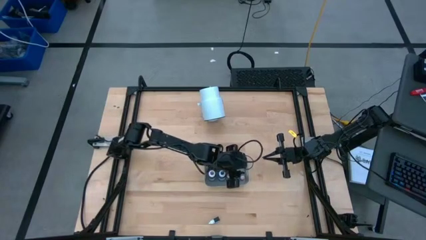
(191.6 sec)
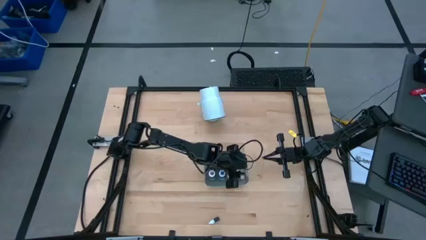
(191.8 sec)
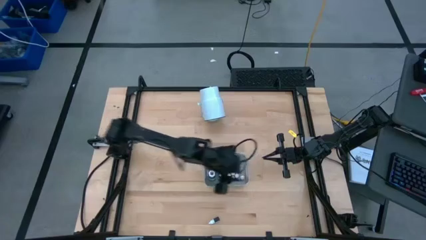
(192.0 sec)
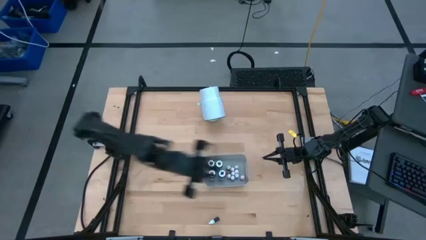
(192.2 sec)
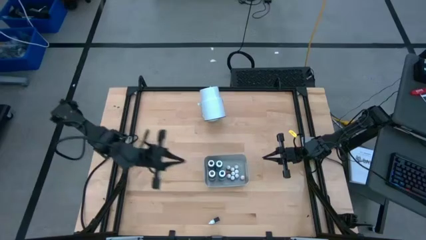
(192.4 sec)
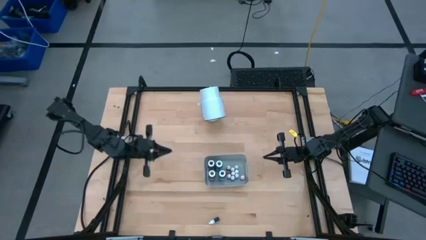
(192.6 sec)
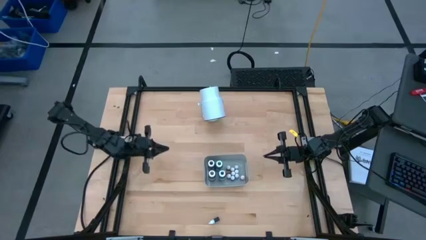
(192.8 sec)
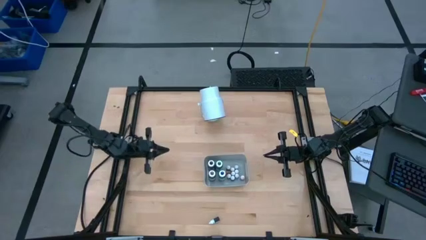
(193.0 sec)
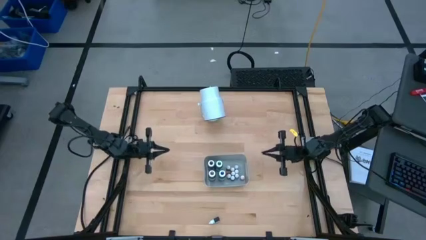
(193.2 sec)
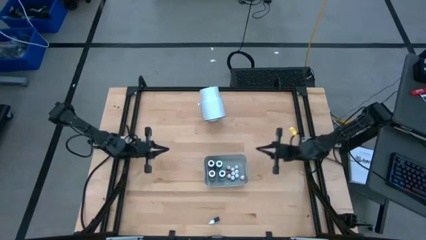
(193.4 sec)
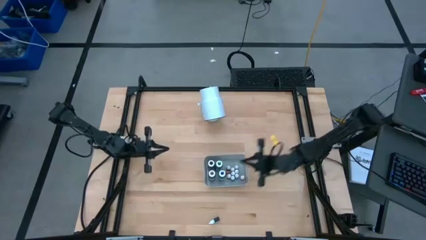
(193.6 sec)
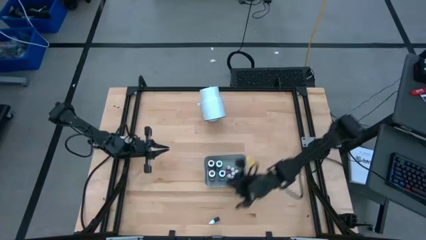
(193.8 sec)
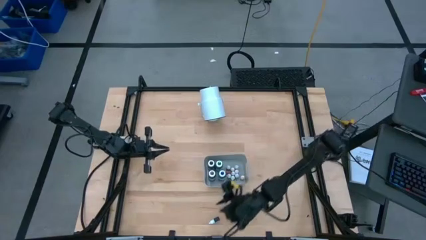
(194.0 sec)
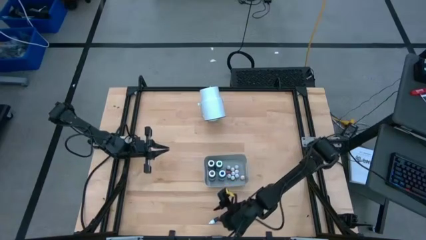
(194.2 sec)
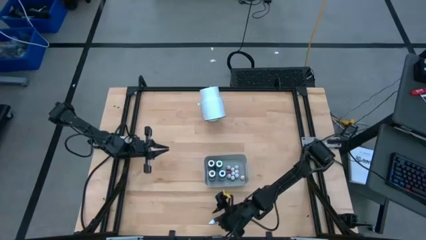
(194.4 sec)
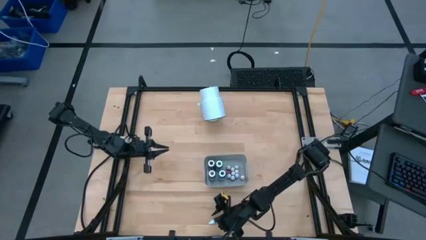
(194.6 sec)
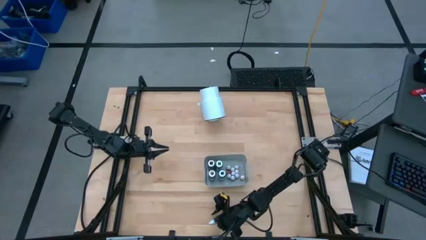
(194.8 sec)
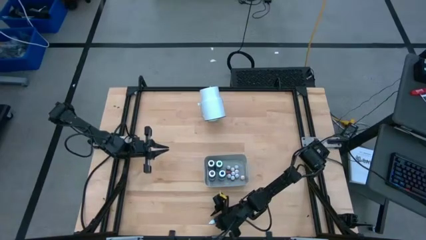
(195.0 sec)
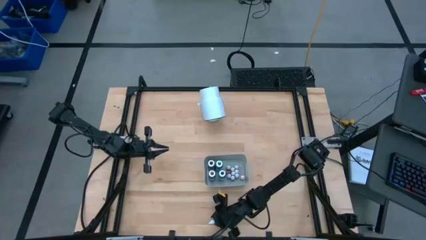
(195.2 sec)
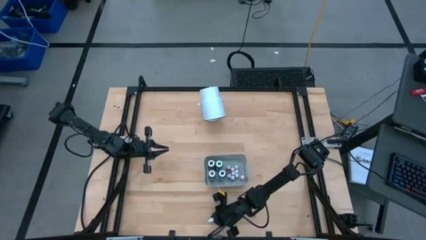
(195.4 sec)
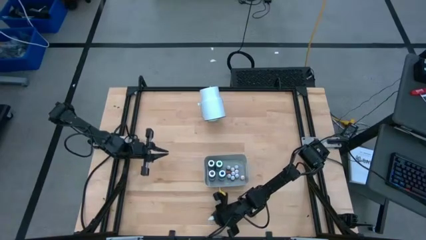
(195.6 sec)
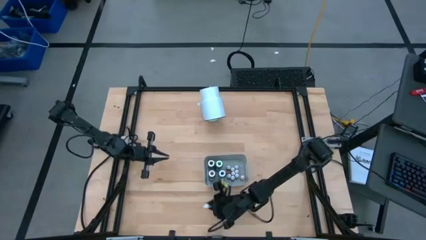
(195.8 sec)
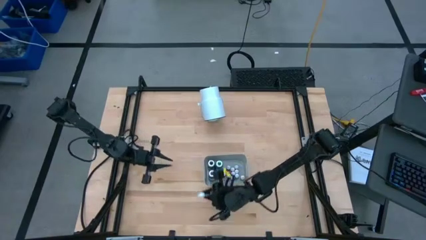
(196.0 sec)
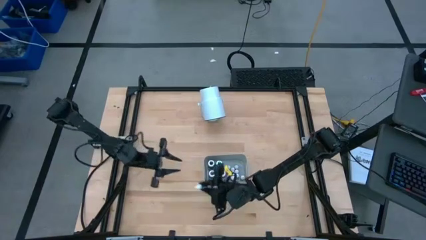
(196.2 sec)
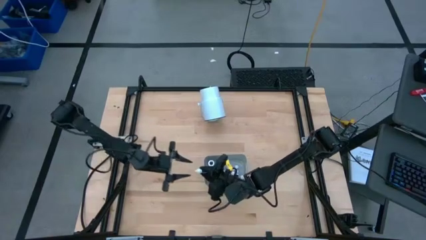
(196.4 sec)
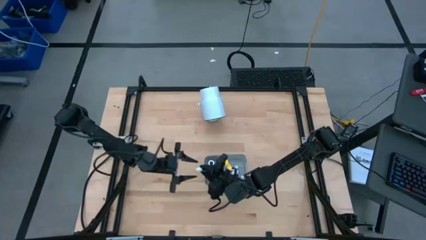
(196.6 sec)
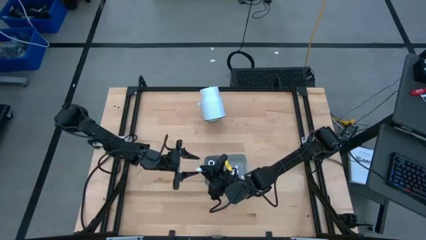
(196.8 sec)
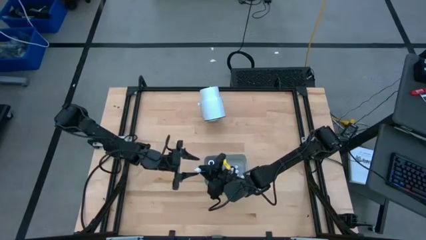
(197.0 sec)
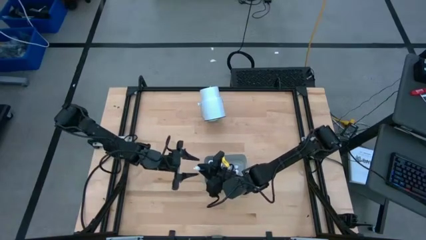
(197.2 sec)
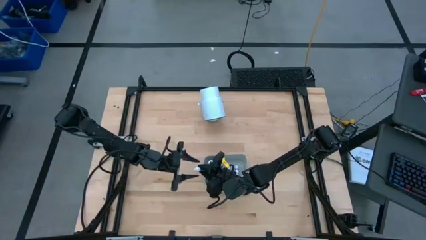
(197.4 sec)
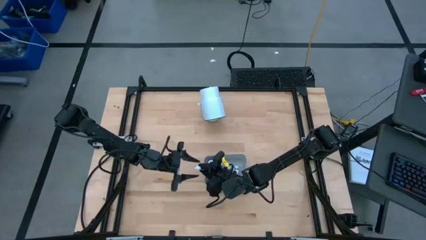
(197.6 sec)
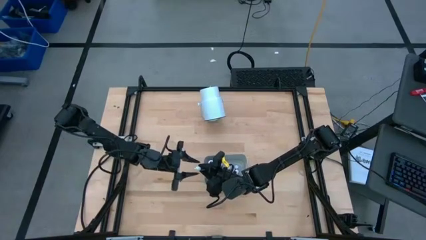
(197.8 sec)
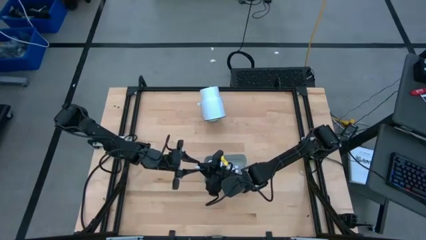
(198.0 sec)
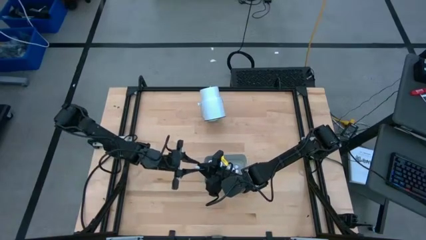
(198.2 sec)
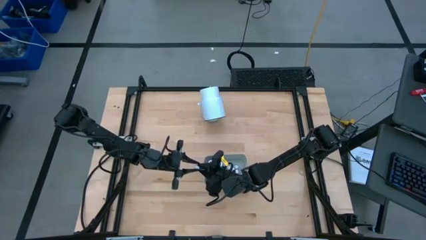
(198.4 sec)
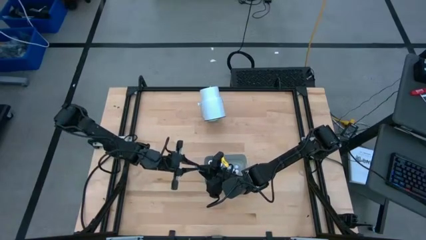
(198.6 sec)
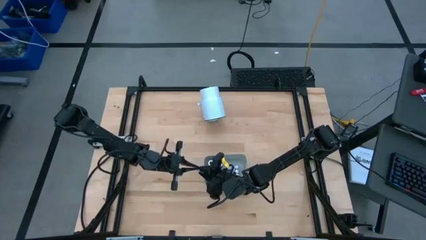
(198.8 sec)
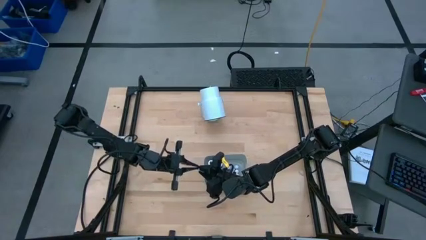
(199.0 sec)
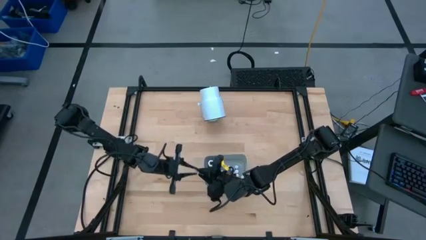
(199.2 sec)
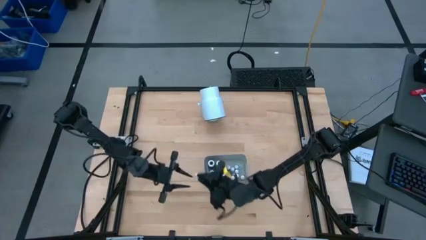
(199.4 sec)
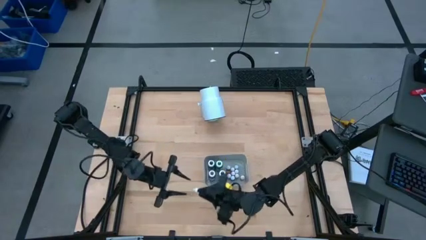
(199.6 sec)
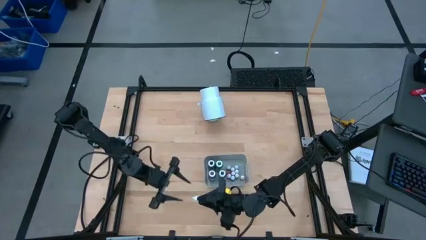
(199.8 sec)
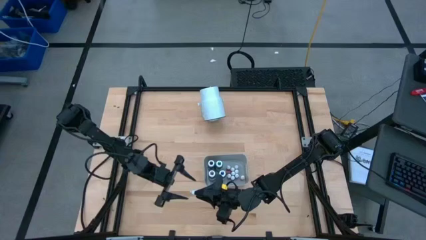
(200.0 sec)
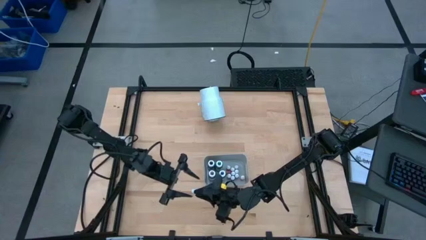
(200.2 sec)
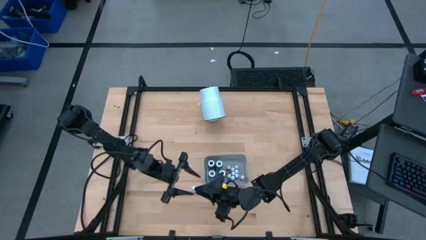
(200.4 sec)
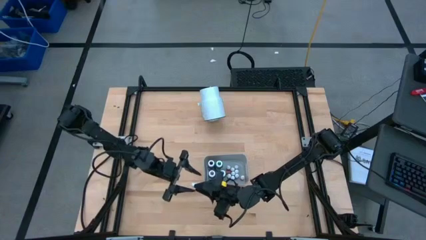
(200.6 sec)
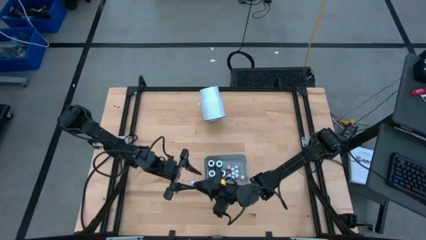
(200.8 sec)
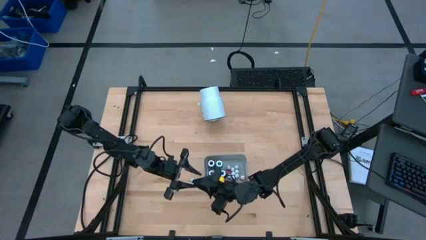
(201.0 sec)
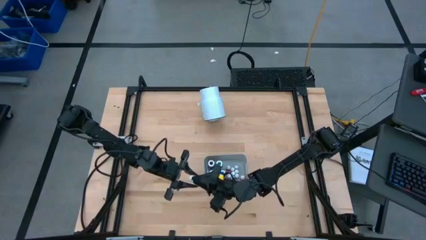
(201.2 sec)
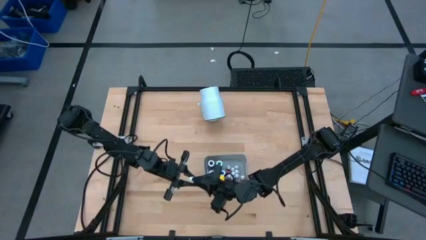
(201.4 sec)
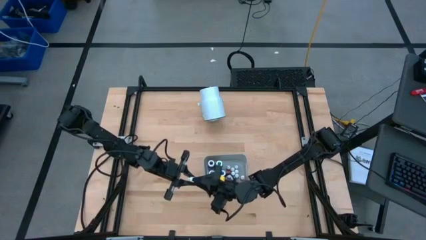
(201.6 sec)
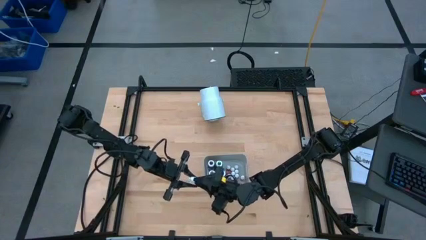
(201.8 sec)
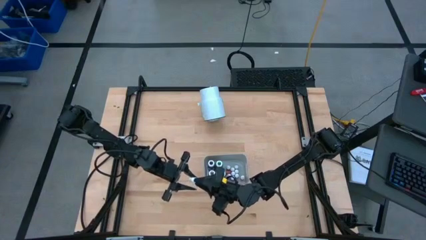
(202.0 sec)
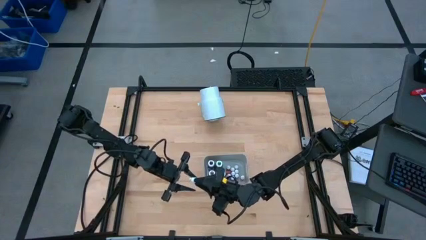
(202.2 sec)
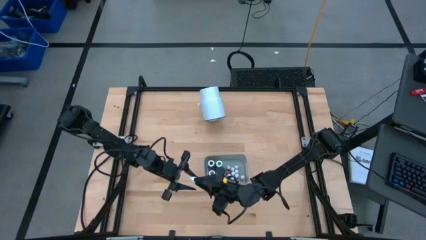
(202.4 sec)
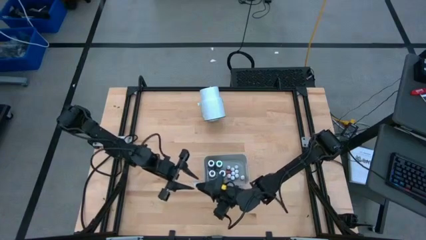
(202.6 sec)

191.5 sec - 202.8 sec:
Task: Pick & Place food coloring
Put the small green food coloring into the gray bin

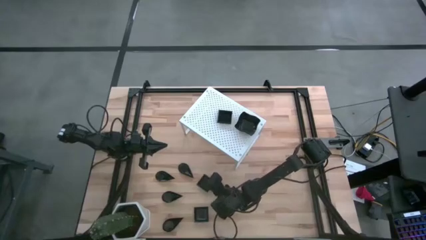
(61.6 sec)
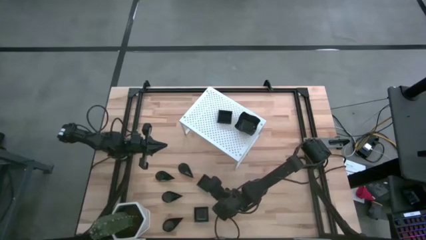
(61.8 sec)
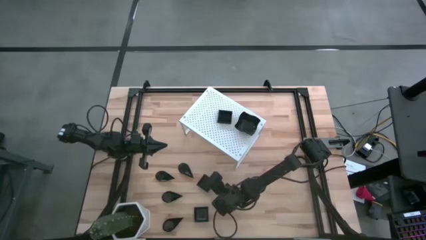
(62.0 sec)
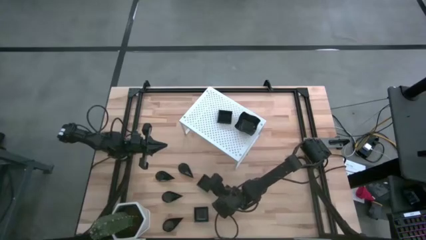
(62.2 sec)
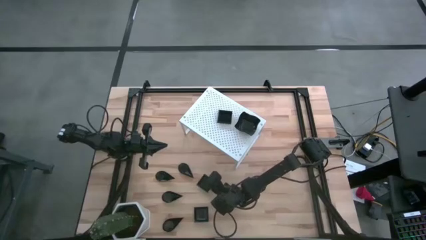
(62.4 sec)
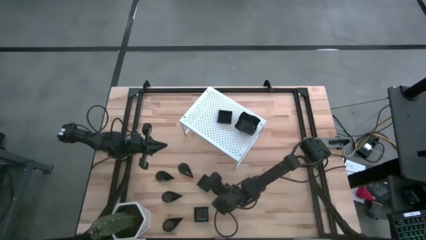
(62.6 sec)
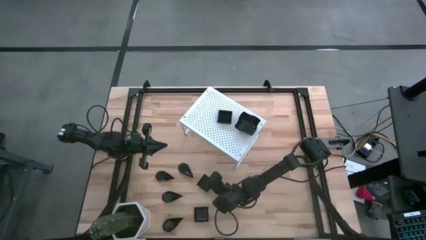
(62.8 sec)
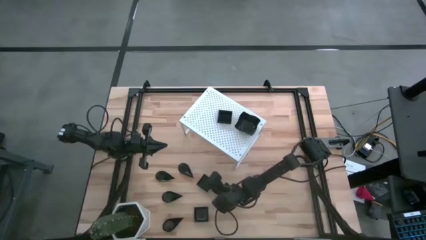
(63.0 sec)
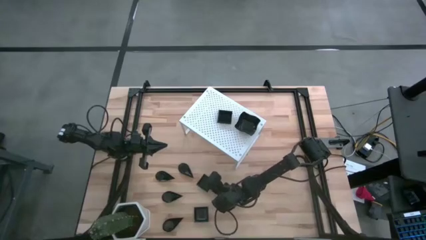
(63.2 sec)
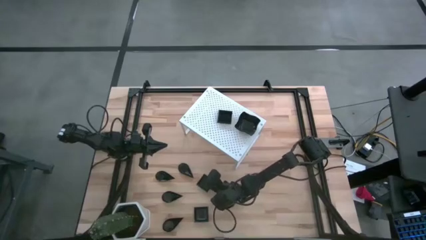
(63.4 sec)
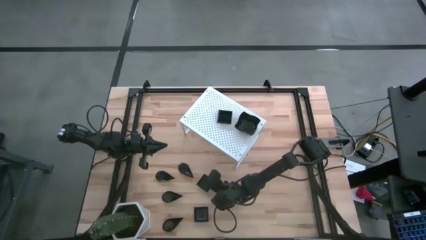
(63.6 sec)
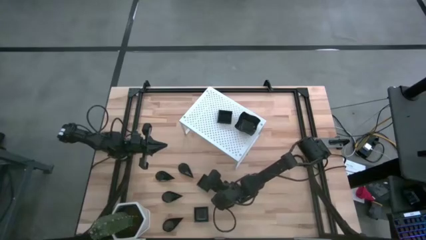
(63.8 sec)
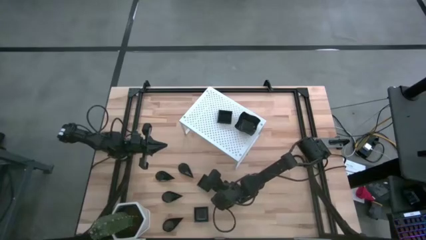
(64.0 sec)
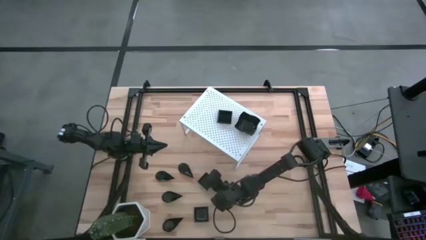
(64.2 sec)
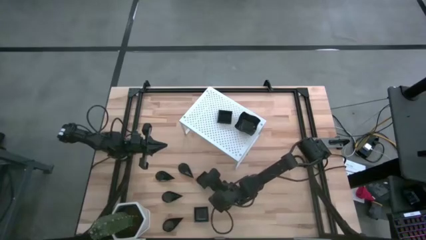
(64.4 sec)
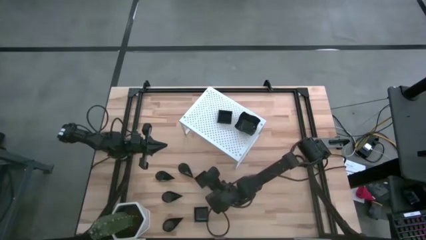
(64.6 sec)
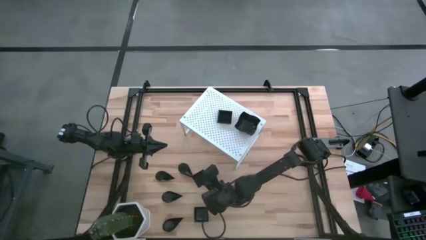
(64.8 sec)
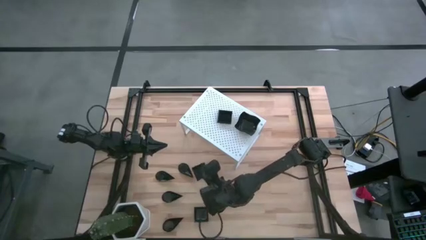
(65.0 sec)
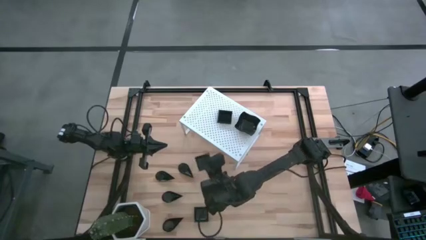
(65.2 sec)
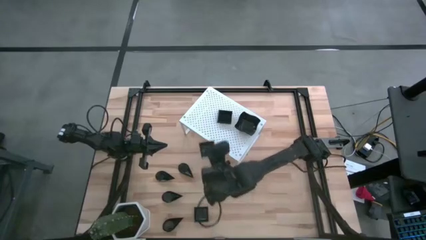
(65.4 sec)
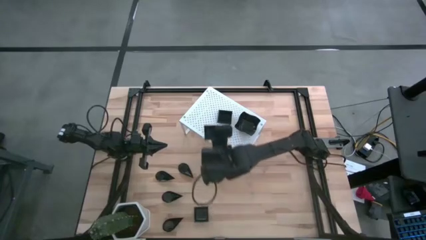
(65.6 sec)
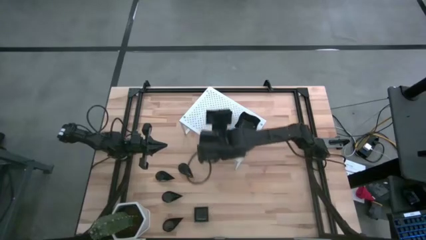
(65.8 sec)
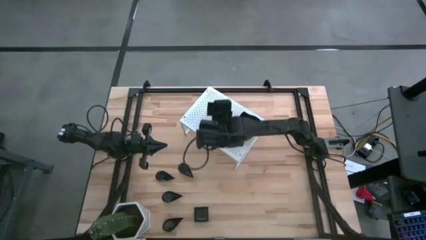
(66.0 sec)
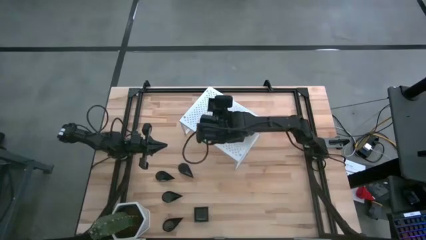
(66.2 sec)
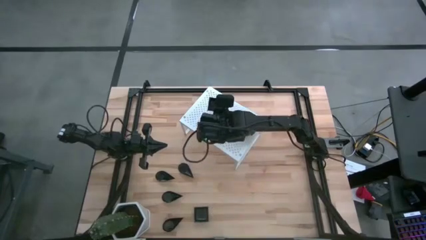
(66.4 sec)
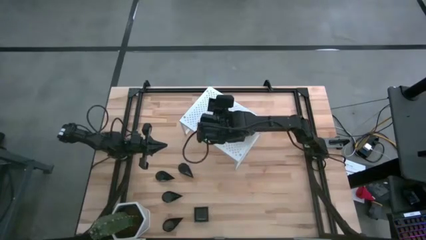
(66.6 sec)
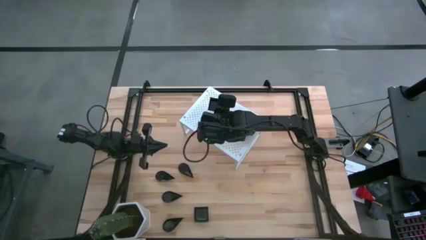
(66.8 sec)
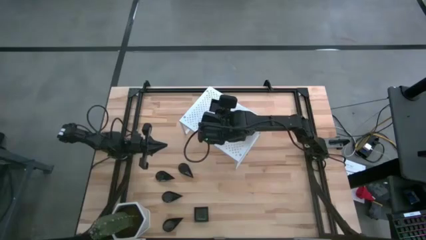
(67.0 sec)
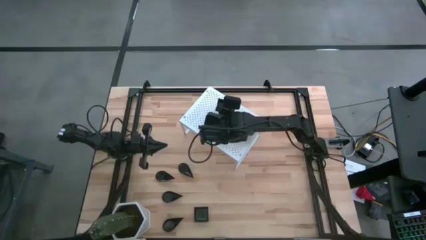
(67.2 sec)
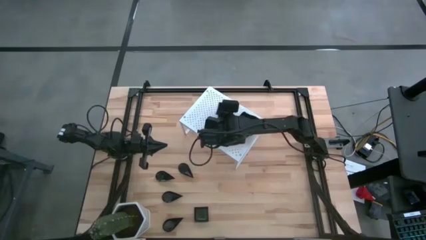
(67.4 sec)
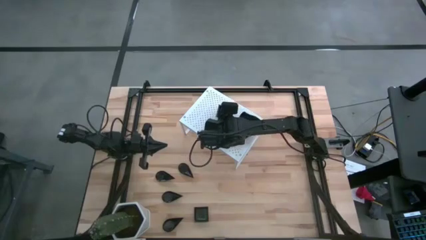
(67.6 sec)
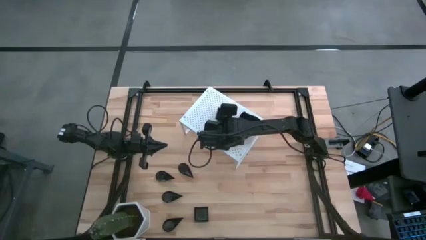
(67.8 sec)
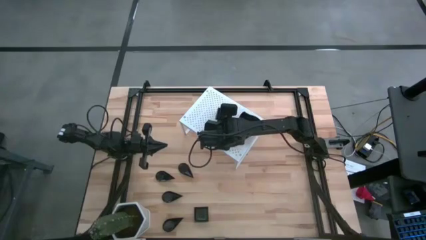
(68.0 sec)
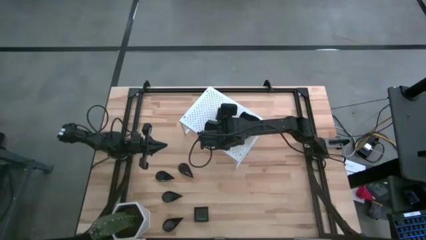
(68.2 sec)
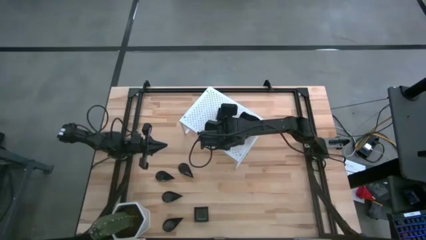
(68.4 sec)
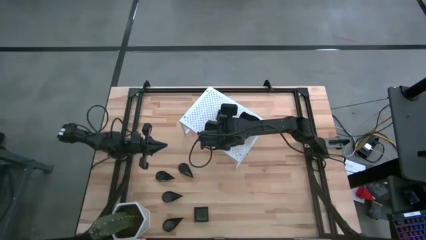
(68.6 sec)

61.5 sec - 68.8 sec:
Task: Pick & Place Mini shaped plates
Stack the square plate on top of the other square plates on the shelf
